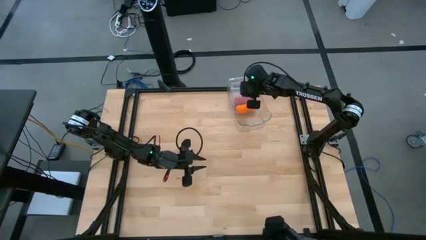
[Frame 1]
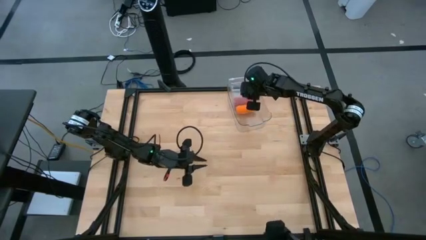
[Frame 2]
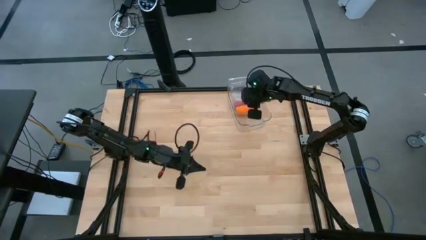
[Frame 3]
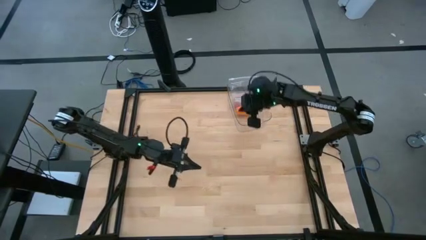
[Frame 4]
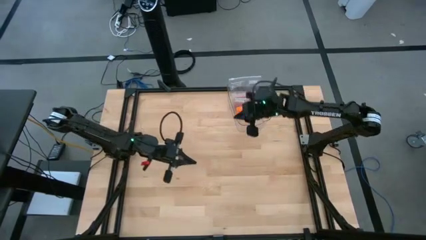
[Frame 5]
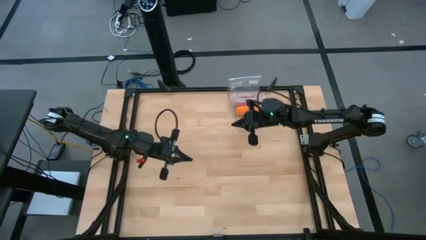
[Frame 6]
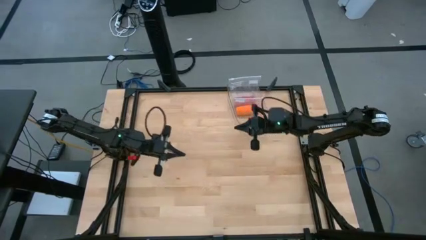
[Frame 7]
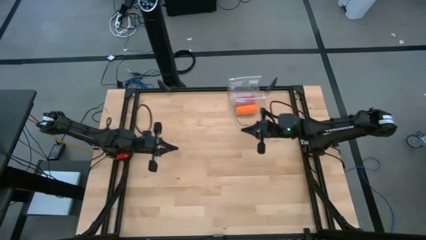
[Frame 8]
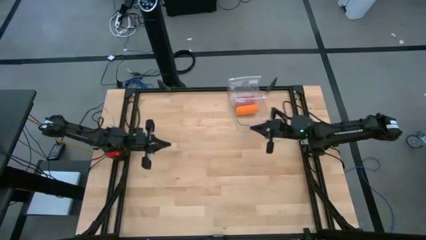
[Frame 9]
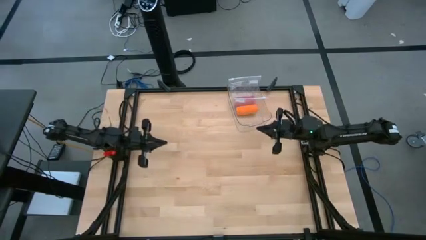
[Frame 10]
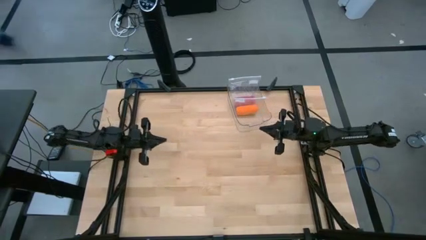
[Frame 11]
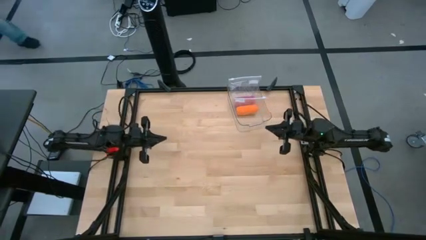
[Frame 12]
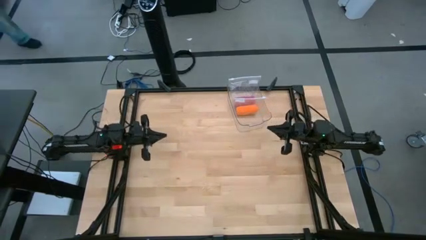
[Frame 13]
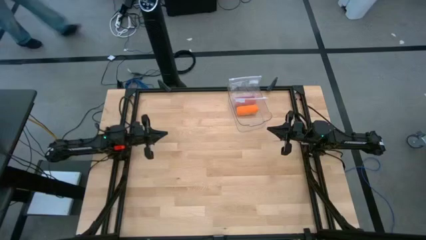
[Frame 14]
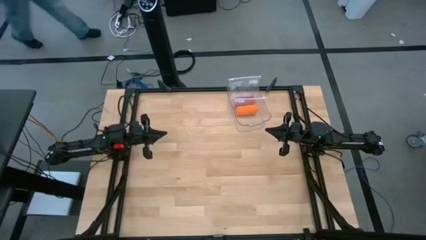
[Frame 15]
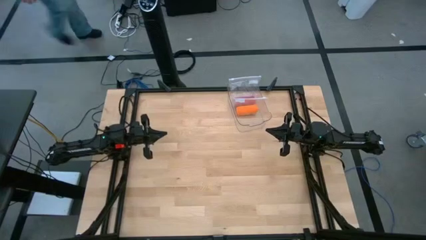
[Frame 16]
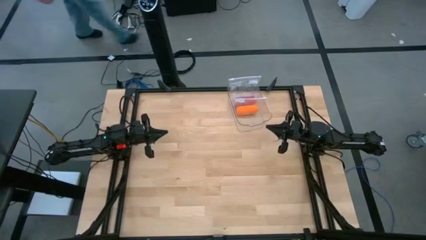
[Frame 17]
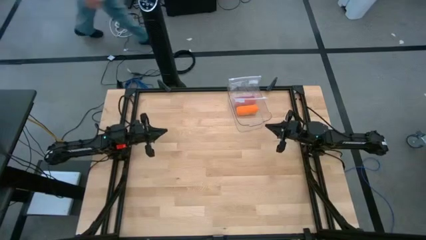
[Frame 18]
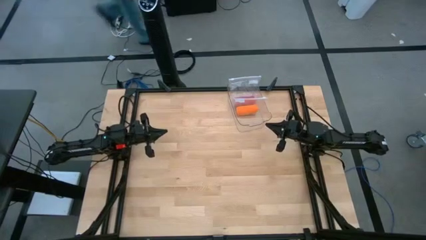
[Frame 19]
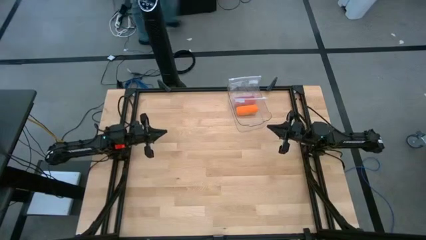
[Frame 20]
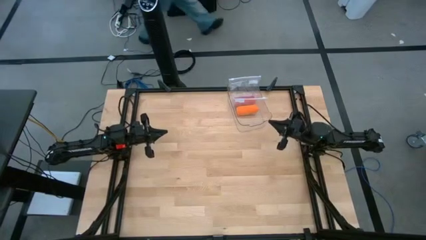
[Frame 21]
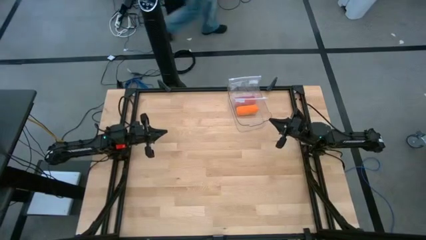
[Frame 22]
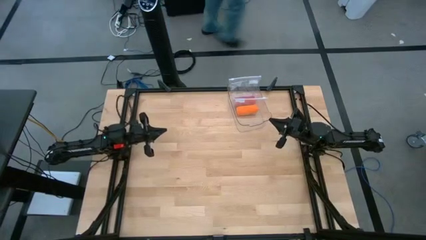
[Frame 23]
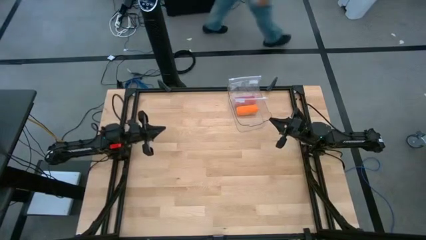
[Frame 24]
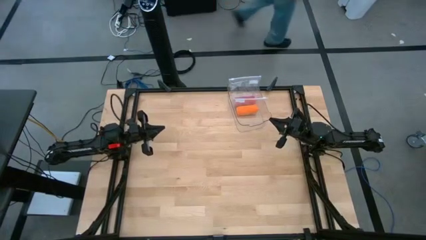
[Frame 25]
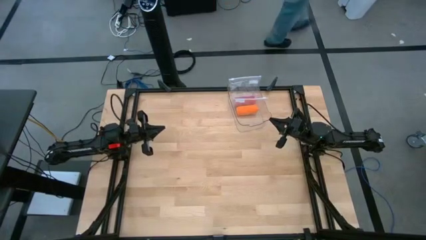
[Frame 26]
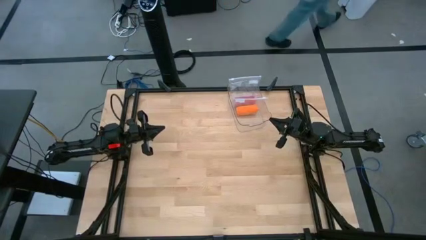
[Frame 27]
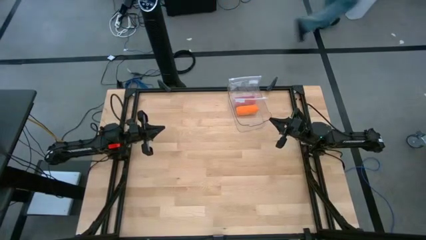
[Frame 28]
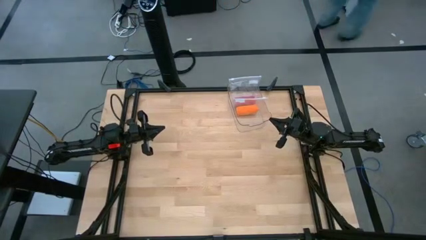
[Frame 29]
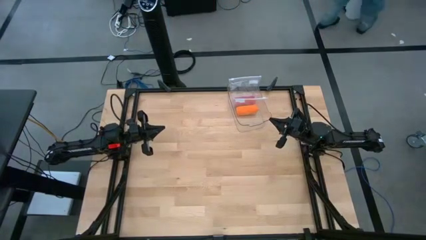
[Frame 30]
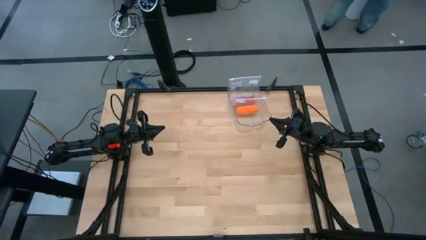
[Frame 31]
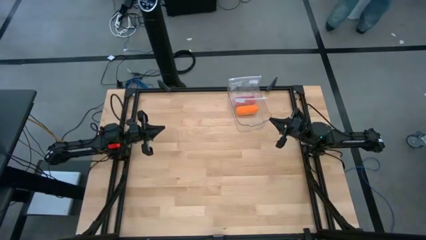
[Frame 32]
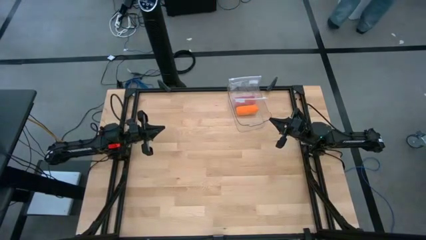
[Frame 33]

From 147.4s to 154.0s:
Task: Roll bandage
Return to Home Position

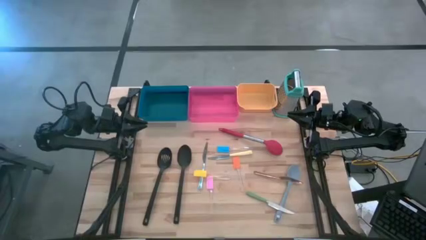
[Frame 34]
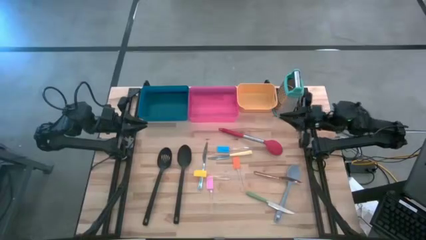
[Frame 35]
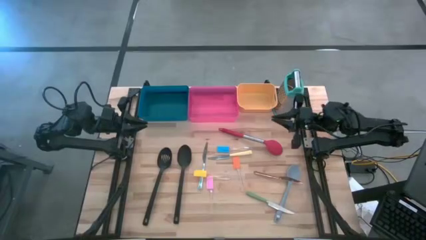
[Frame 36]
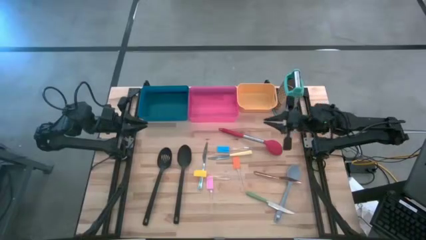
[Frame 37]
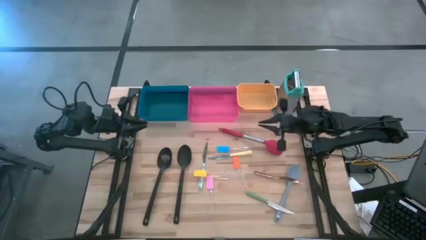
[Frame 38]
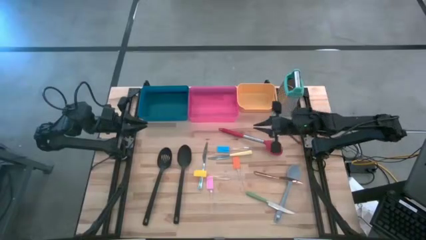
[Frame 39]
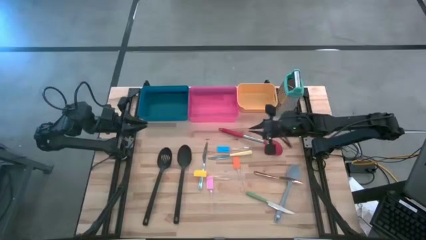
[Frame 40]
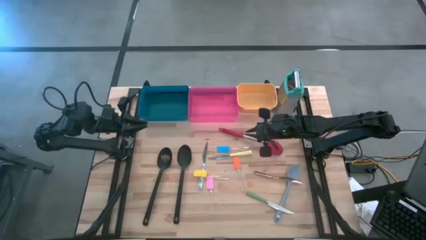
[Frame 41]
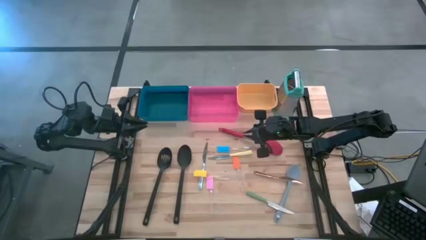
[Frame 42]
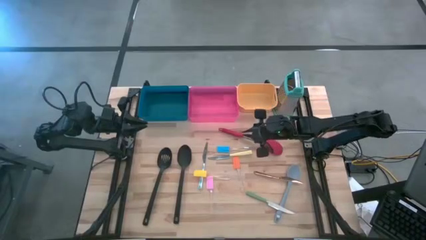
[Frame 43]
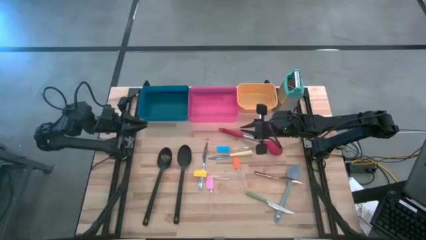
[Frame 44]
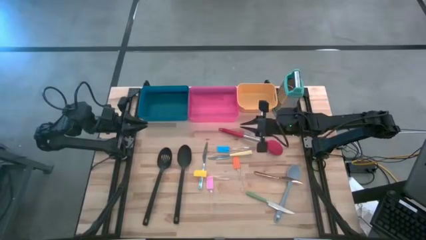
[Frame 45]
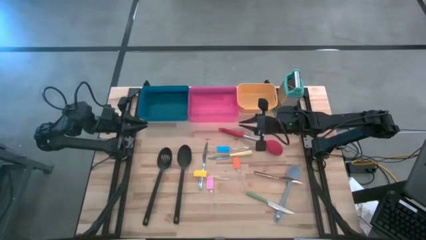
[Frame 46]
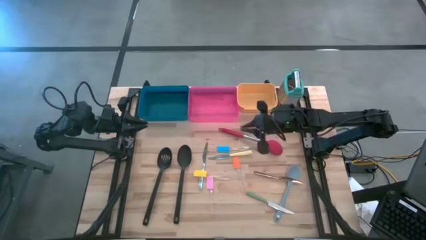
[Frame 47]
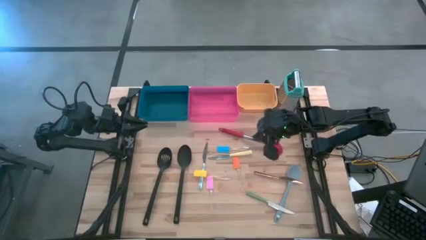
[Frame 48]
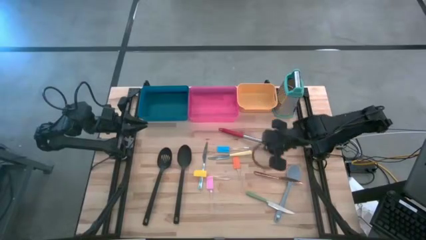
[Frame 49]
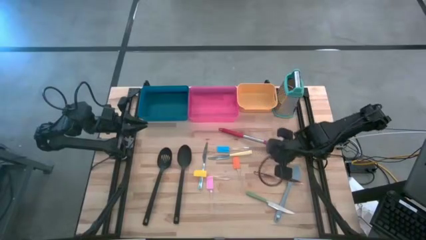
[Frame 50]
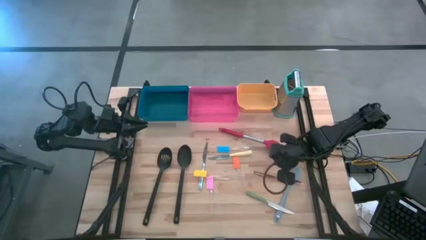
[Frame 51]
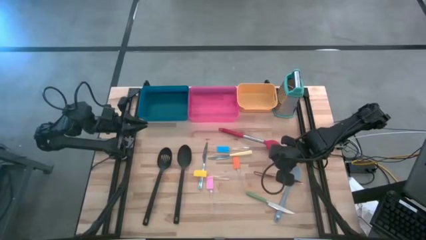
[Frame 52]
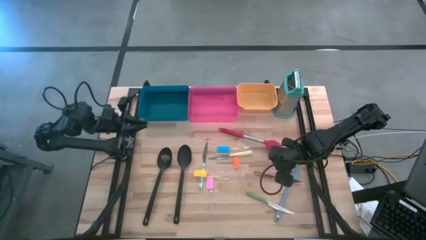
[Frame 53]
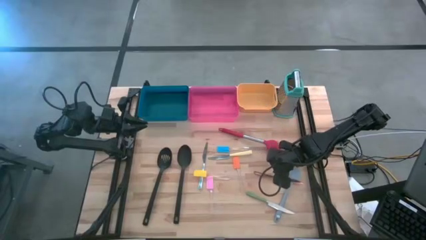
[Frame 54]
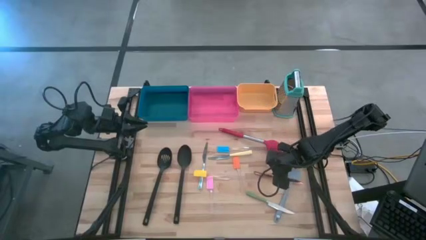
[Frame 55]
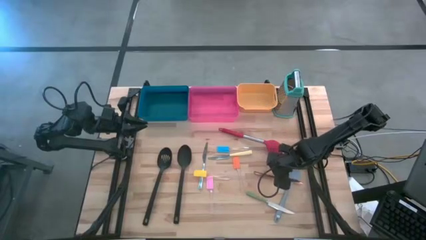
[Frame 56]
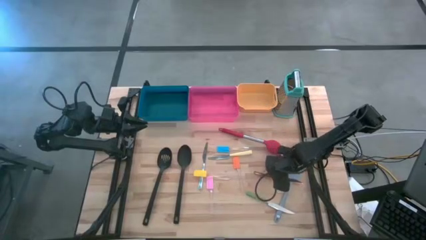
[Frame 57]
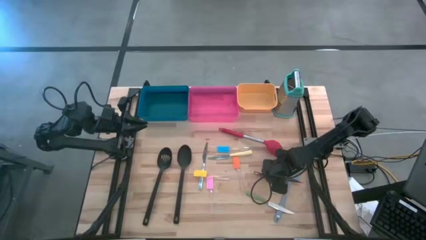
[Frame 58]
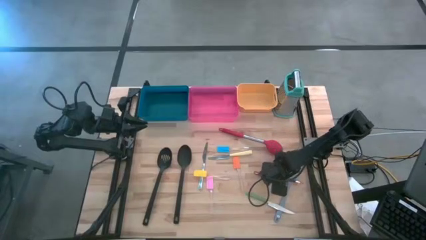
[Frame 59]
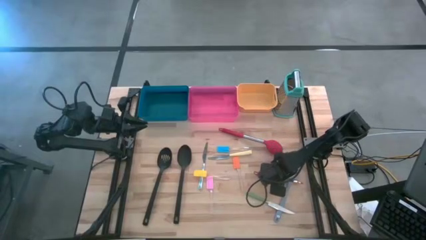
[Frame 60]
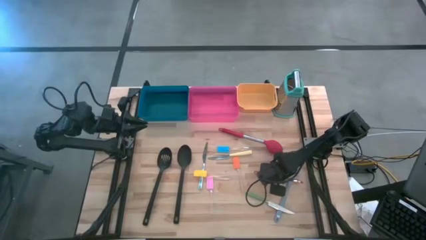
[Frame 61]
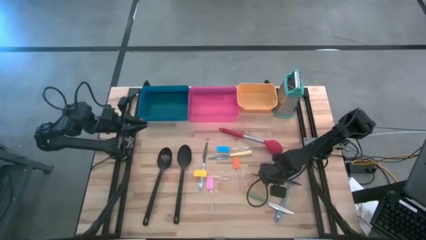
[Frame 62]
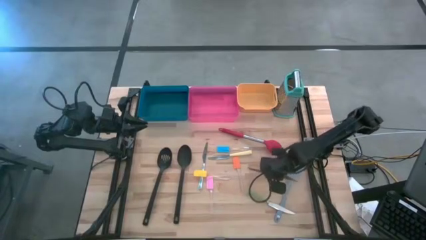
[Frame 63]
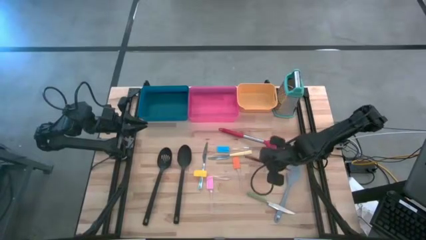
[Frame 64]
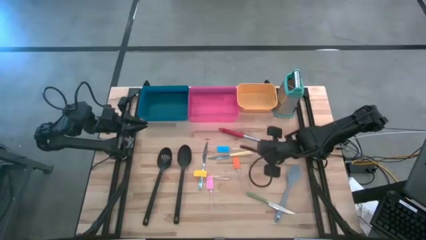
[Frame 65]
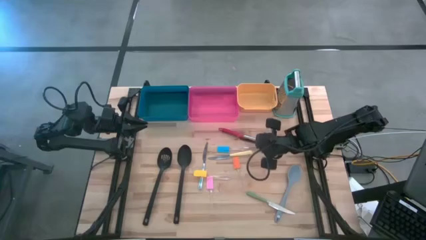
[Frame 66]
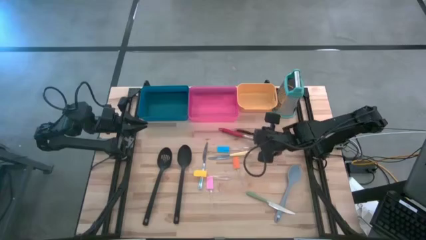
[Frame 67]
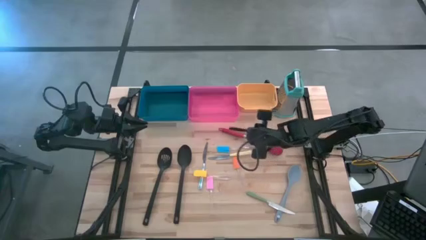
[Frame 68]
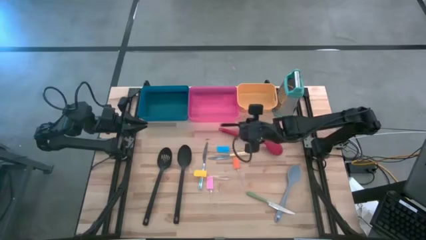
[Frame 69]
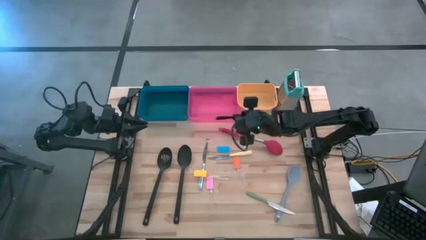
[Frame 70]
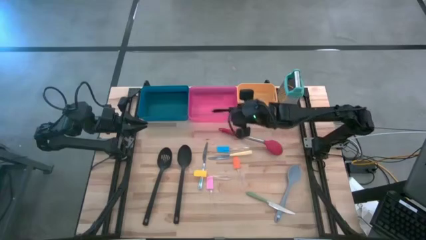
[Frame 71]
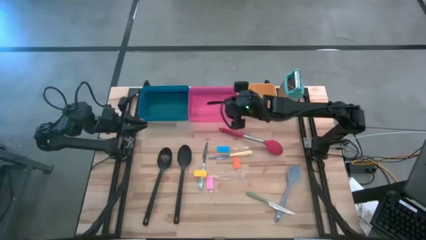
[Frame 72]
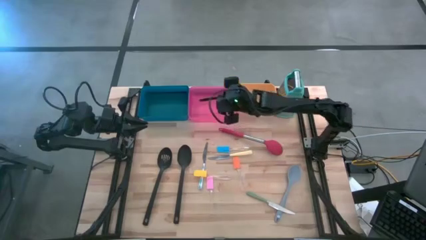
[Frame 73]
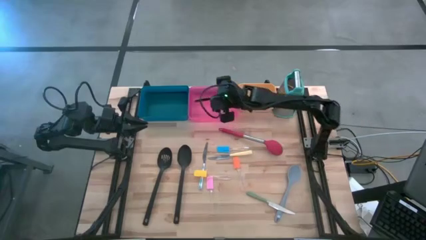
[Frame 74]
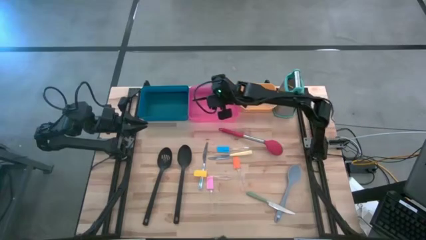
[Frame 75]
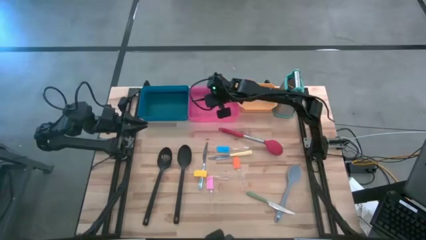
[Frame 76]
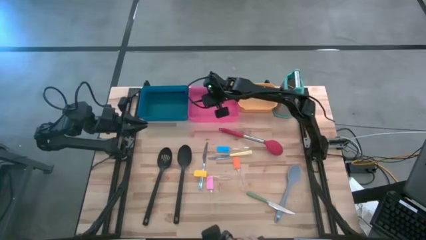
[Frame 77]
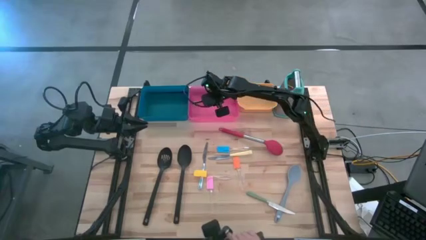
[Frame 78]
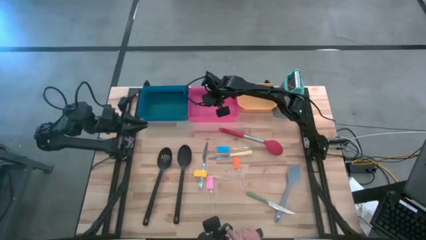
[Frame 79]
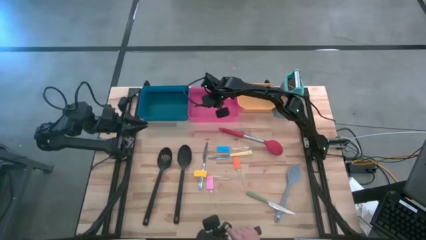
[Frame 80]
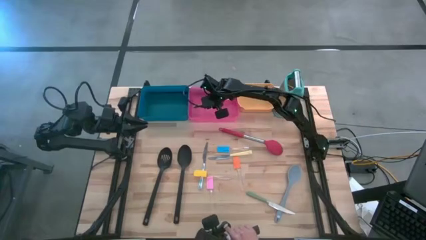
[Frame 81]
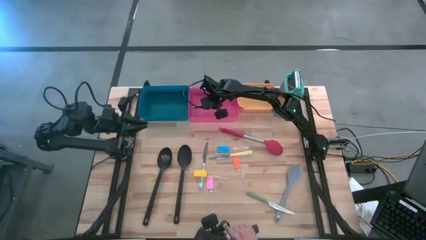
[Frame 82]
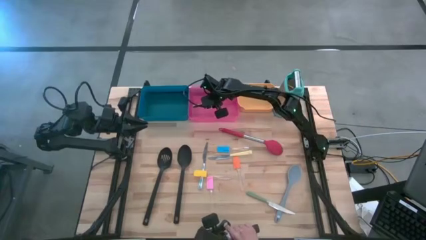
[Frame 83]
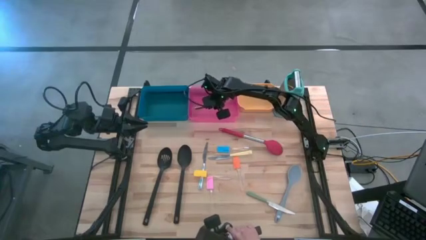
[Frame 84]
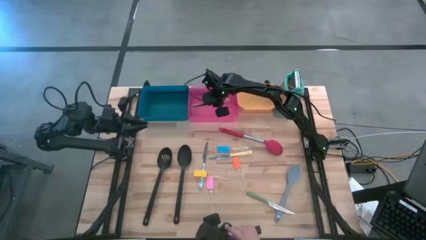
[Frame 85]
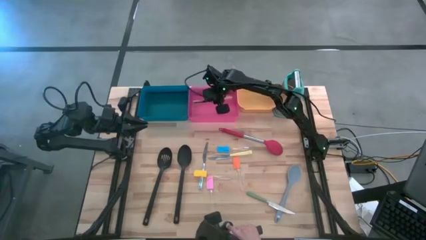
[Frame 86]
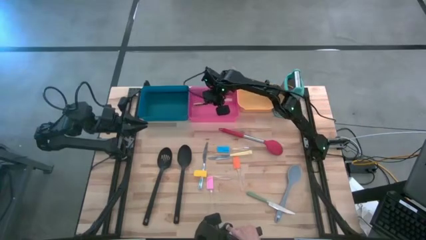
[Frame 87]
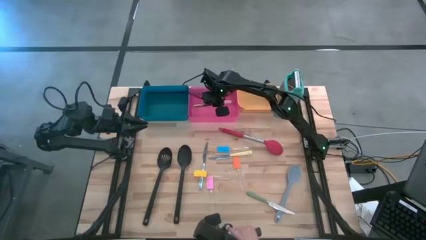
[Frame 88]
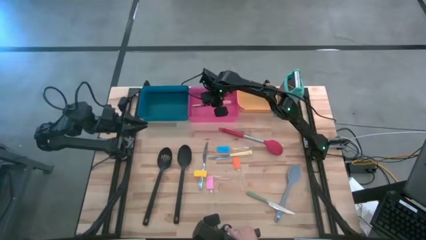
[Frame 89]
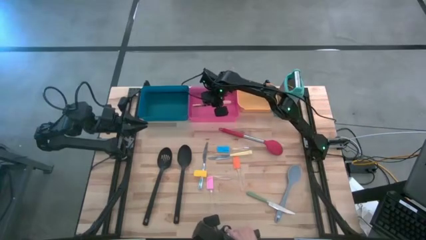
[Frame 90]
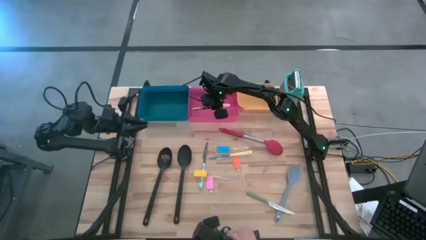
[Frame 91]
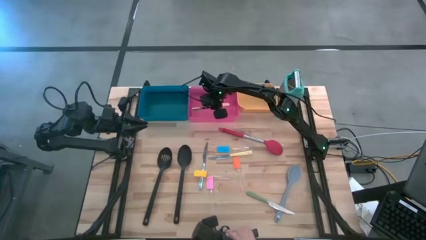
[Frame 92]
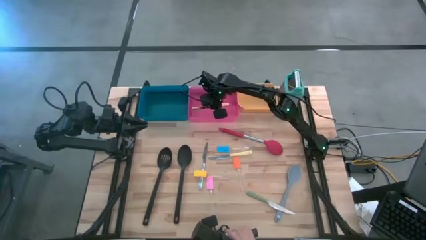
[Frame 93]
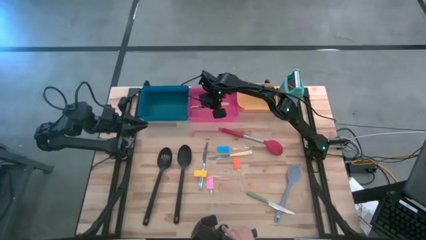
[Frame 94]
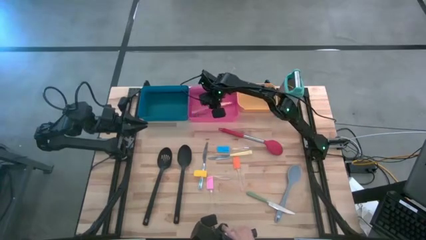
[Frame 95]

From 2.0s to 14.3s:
Task: Pick & Place Kitchen Items
Put the gold knife into the pink bin
